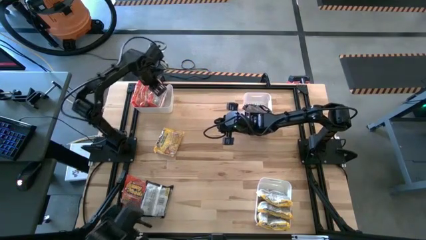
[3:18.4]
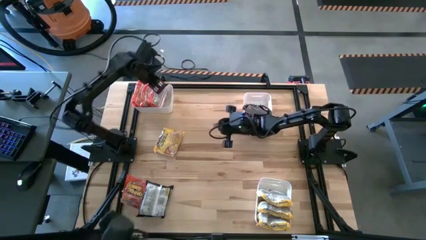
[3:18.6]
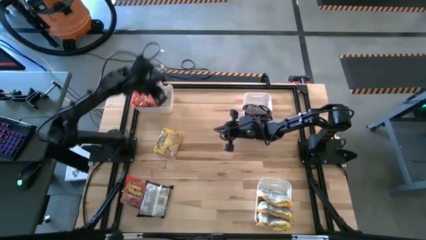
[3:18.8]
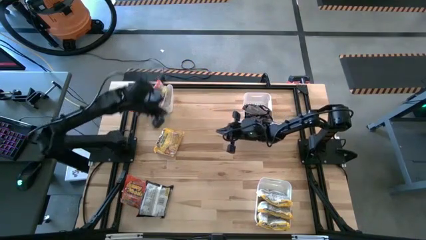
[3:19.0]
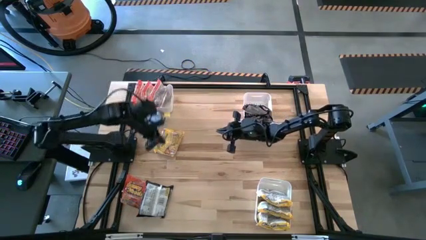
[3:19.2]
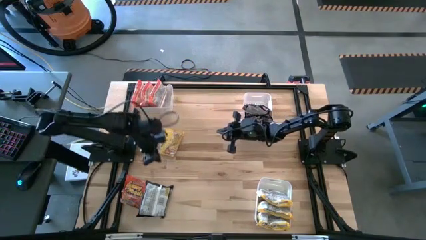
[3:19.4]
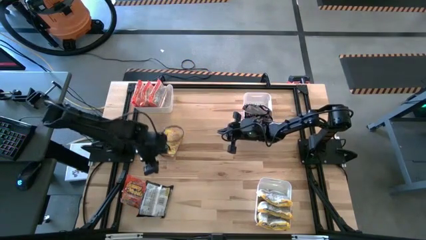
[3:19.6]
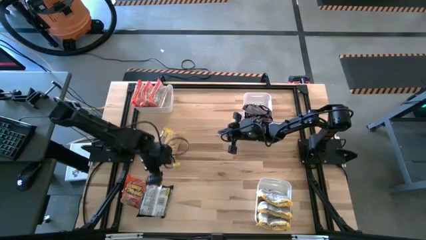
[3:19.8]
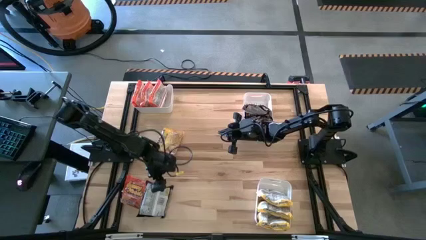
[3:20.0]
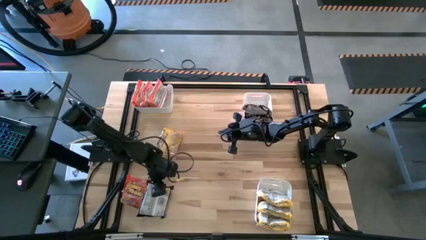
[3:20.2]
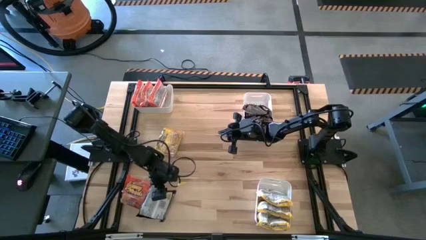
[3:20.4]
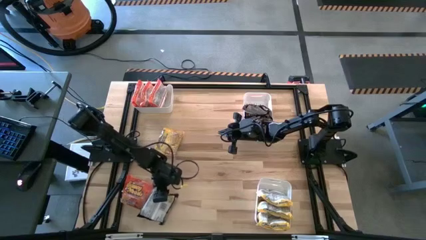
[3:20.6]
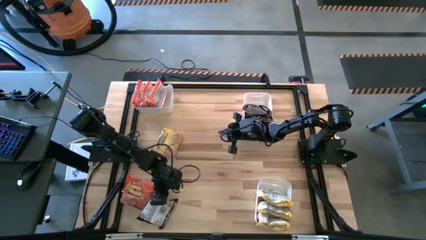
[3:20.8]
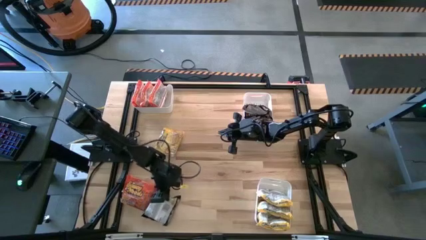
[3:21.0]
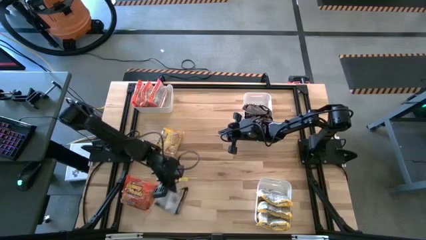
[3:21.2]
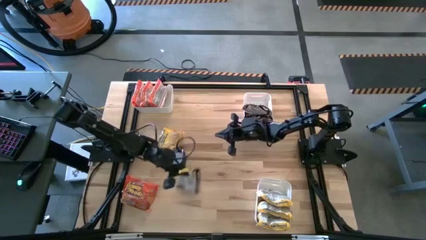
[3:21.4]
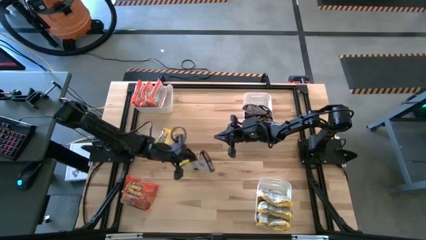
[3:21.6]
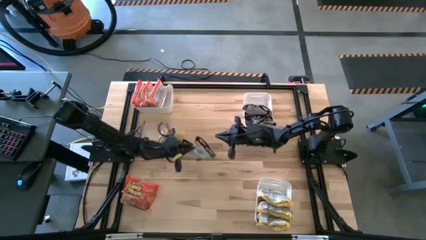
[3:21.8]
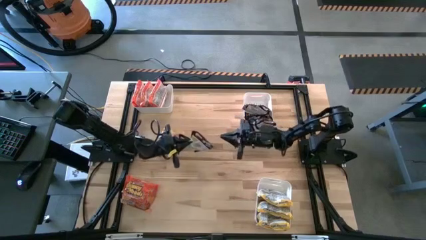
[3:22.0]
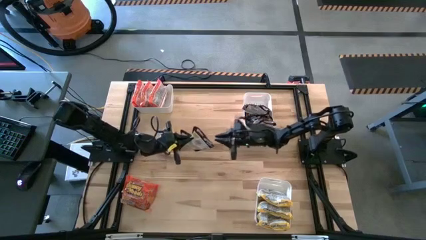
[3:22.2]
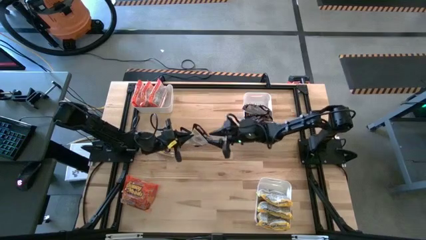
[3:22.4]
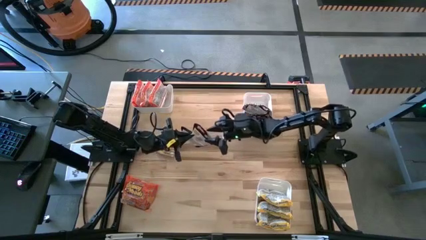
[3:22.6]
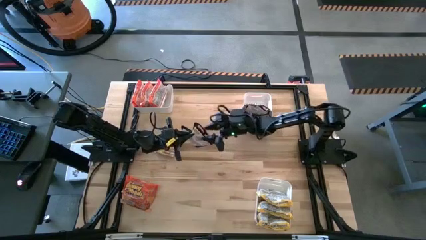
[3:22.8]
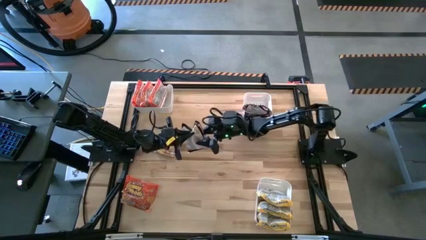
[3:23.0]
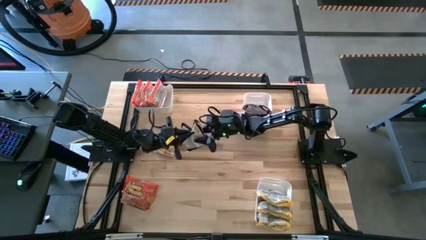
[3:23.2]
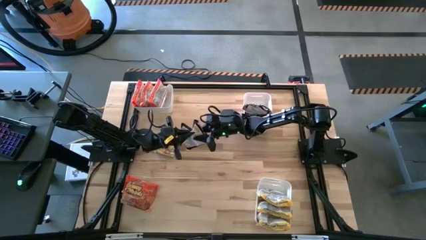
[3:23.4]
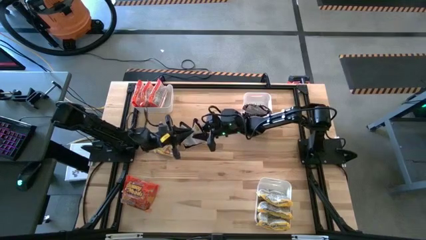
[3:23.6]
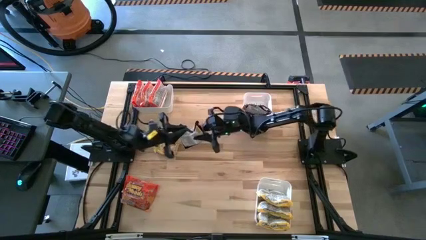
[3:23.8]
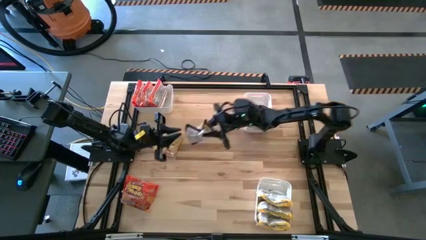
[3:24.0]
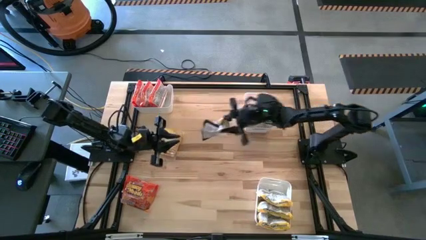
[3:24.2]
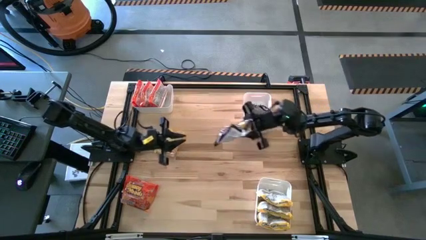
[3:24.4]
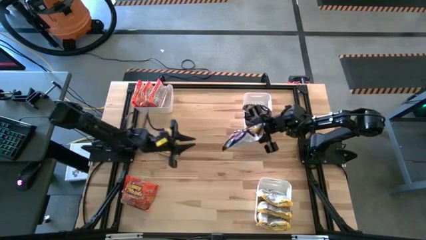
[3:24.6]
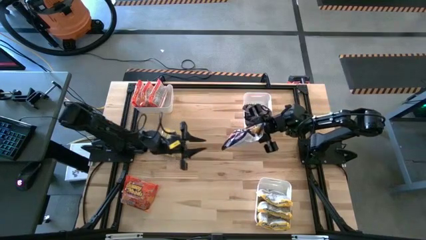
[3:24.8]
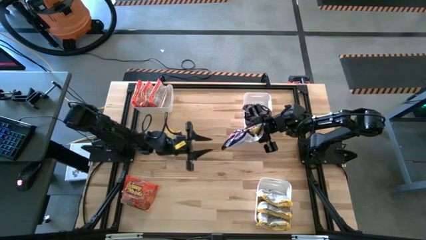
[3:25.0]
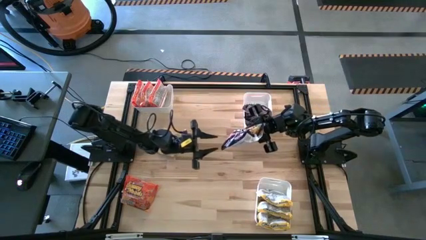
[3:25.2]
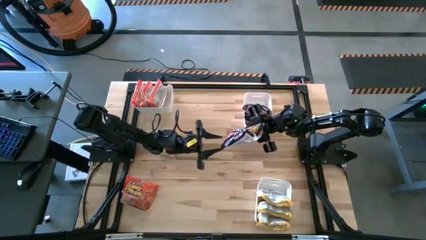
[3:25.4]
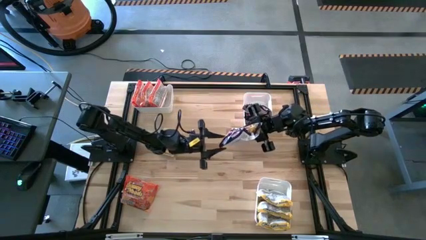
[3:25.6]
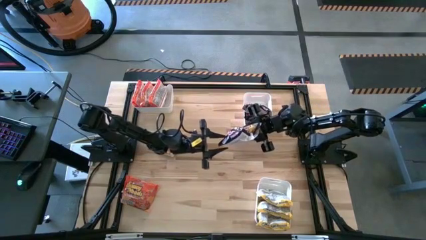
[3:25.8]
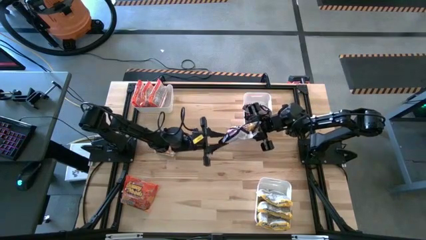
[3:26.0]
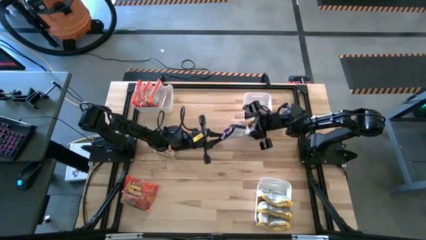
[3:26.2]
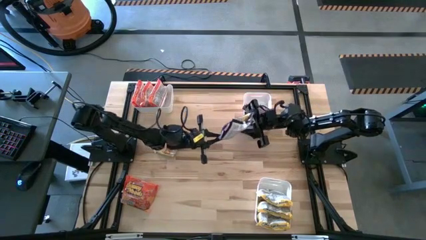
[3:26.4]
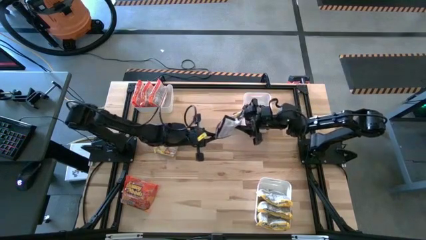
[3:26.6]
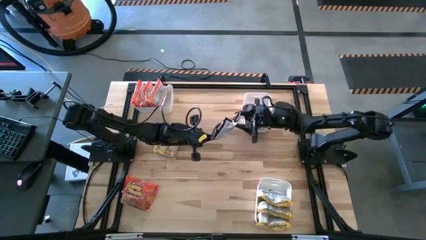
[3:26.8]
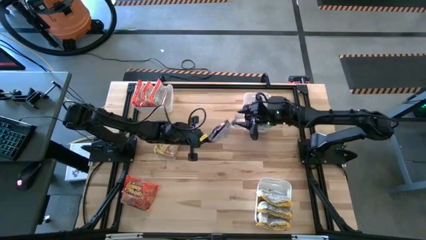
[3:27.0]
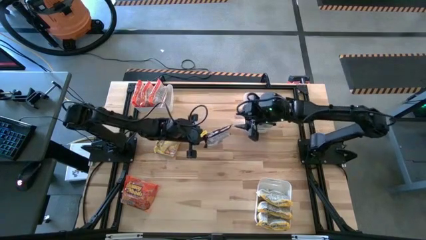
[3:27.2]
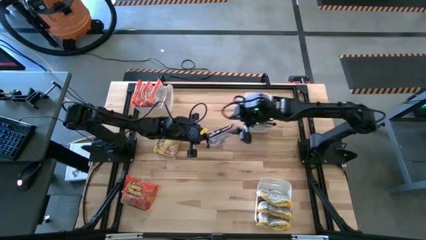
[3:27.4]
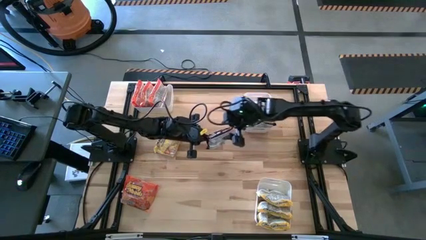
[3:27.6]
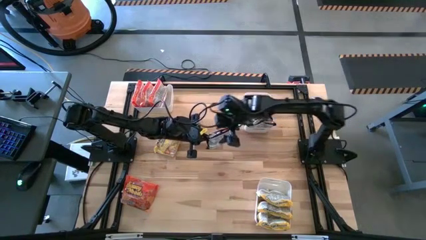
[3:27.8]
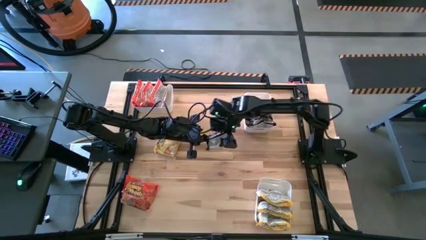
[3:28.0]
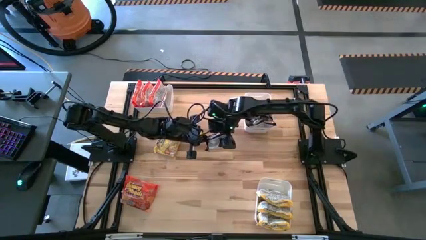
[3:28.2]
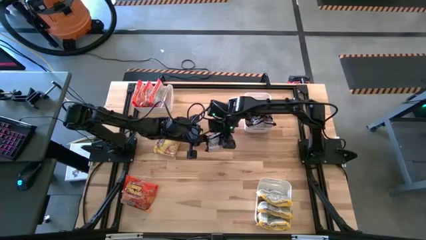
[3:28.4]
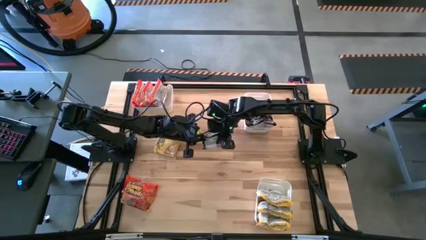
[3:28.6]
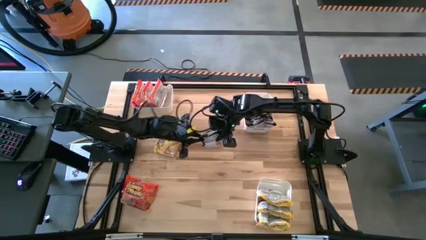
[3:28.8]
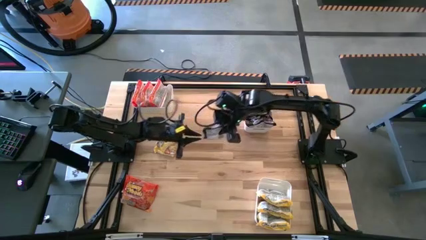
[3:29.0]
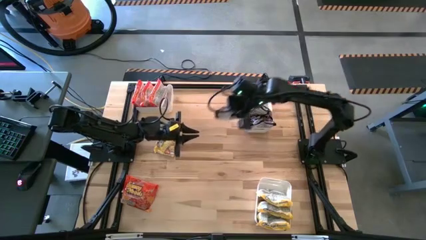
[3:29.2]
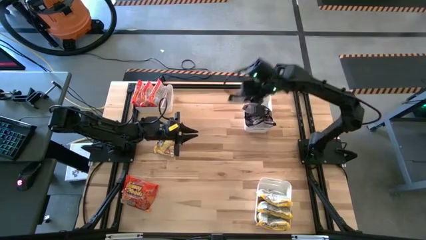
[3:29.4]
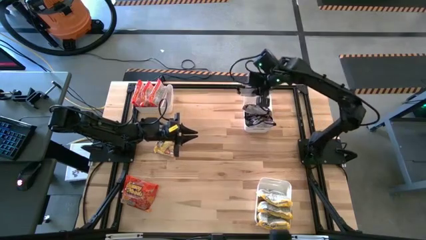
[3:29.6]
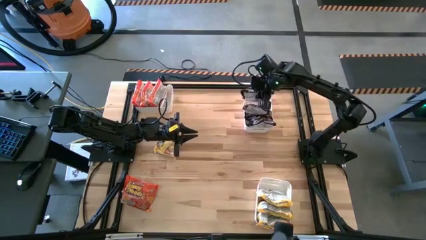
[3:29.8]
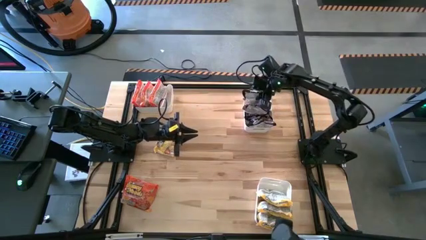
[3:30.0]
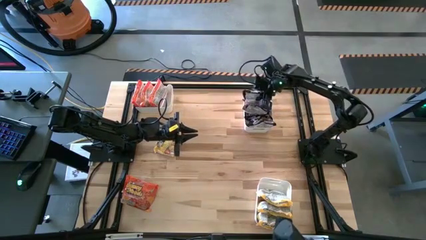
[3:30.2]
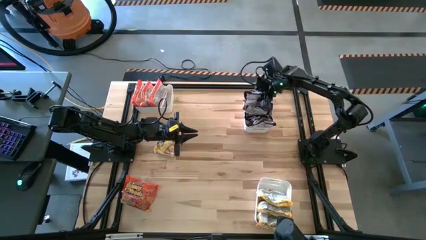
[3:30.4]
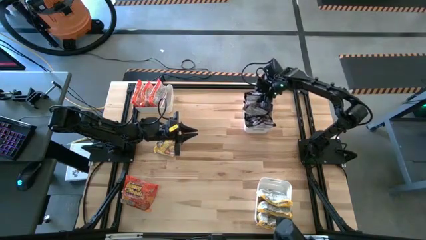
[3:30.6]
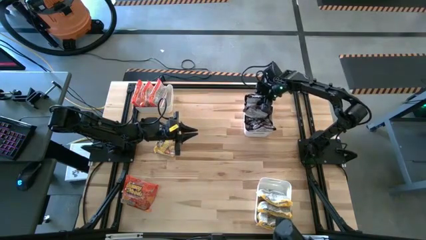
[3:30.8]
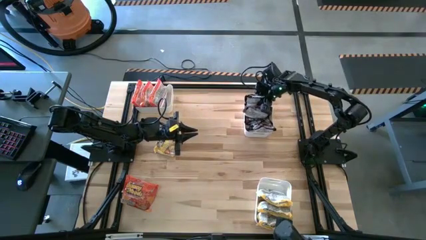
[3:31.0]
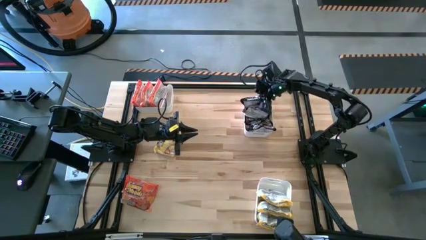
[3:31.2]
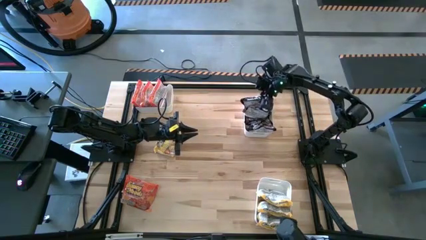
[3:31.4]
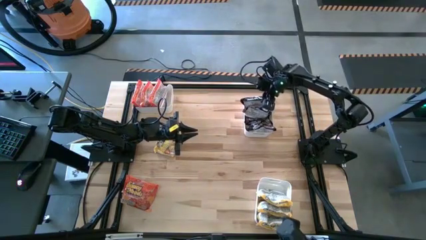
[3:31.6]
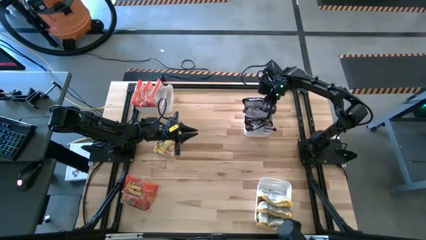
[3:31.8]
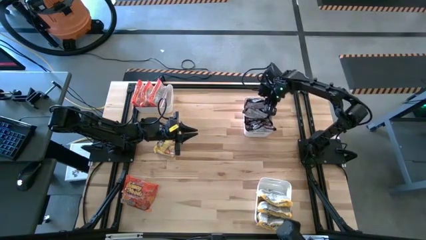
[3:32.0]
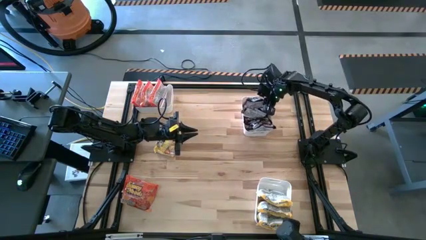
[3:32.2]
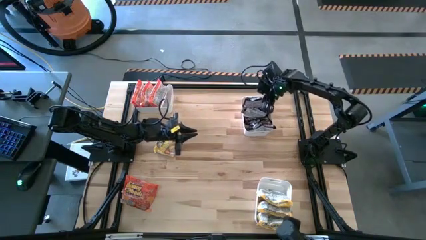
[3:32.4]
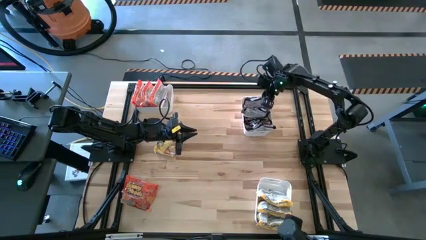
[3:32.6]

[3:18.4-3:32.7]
Task: Sort Maruchan noodles
Put the black noodle pack into the top right white bin
